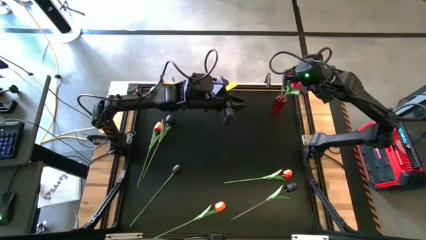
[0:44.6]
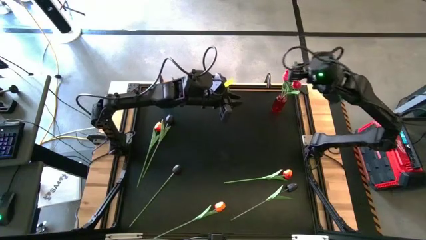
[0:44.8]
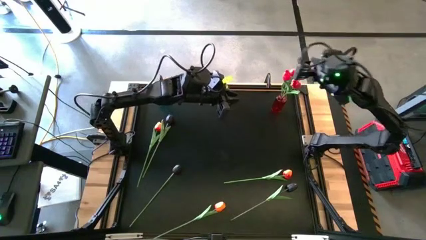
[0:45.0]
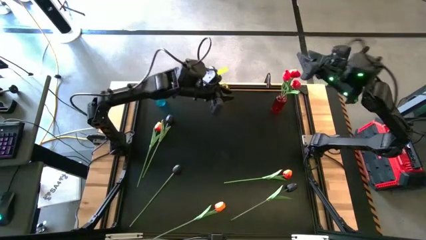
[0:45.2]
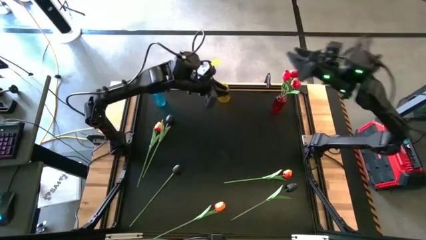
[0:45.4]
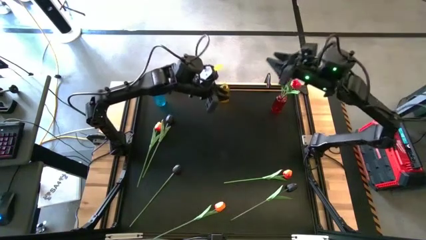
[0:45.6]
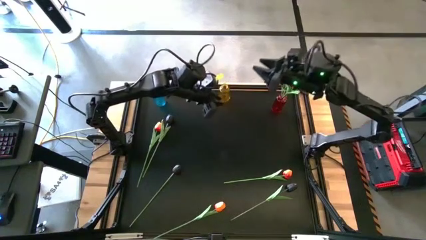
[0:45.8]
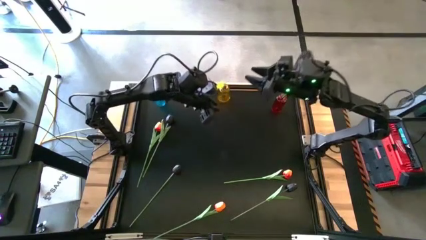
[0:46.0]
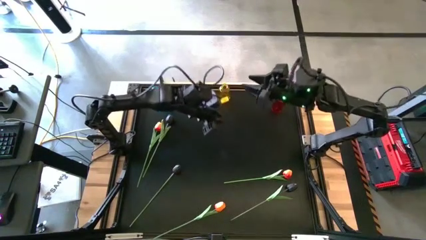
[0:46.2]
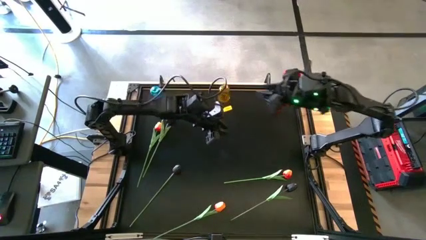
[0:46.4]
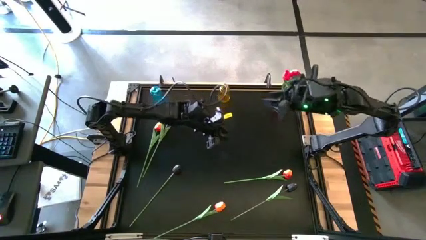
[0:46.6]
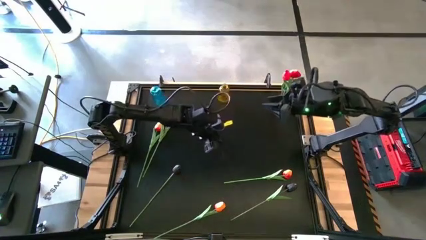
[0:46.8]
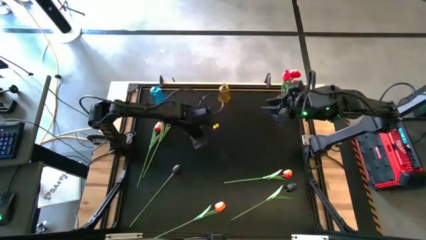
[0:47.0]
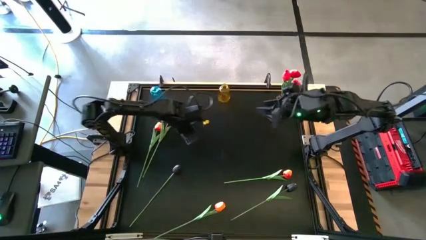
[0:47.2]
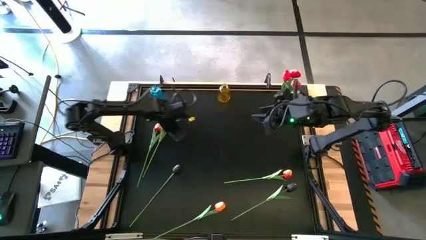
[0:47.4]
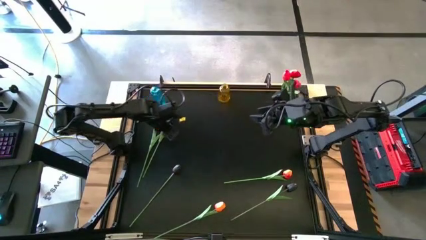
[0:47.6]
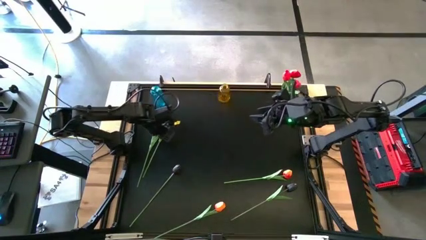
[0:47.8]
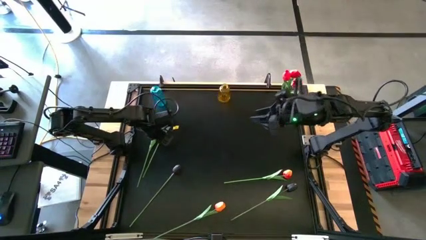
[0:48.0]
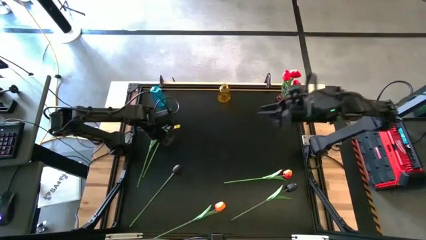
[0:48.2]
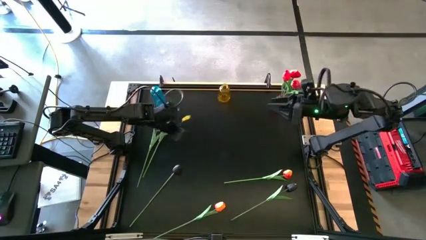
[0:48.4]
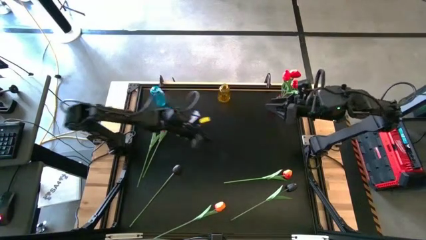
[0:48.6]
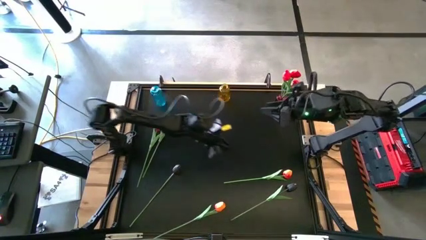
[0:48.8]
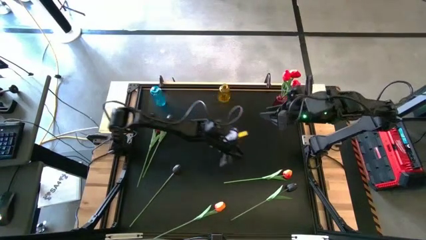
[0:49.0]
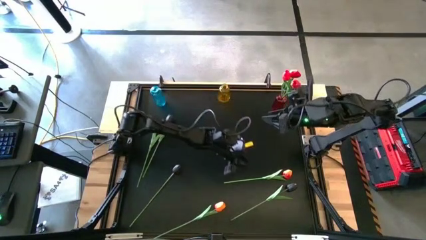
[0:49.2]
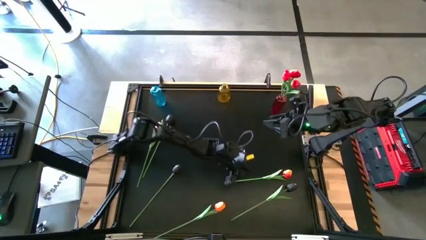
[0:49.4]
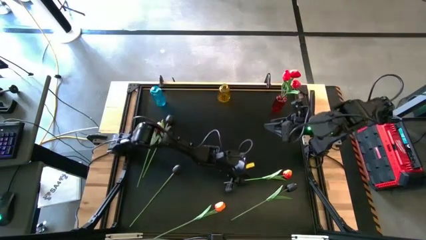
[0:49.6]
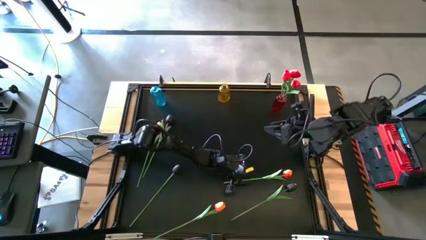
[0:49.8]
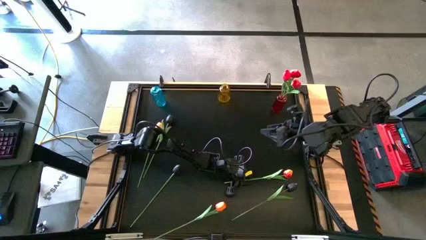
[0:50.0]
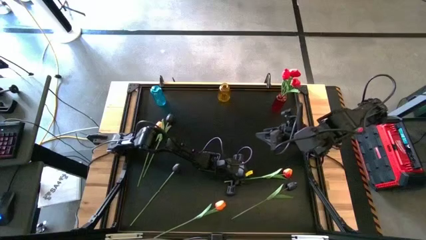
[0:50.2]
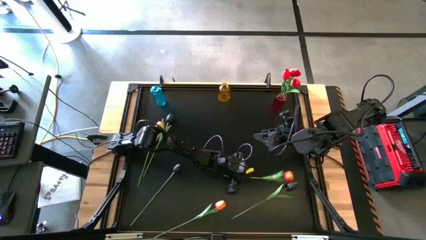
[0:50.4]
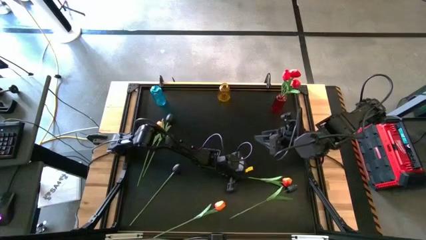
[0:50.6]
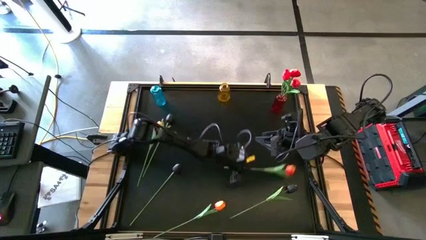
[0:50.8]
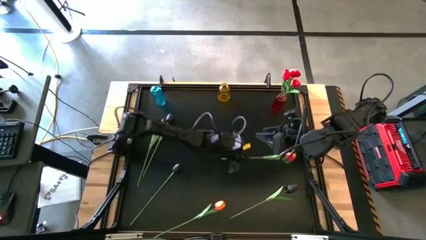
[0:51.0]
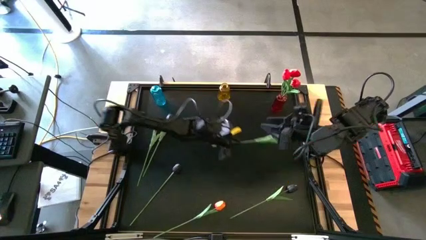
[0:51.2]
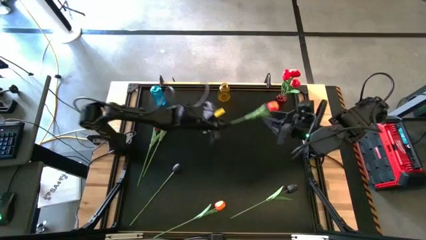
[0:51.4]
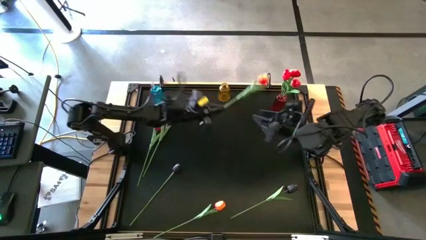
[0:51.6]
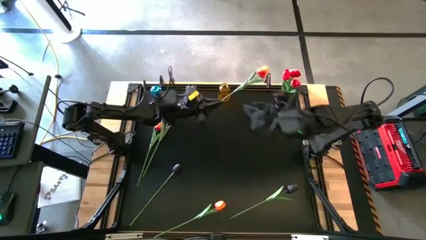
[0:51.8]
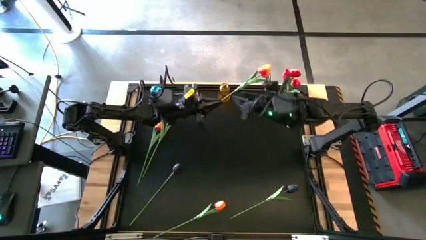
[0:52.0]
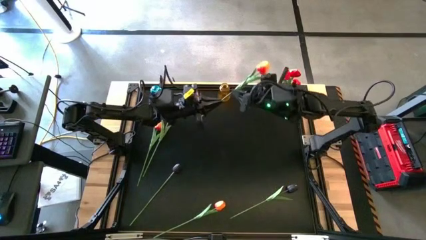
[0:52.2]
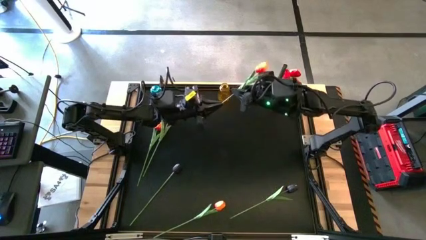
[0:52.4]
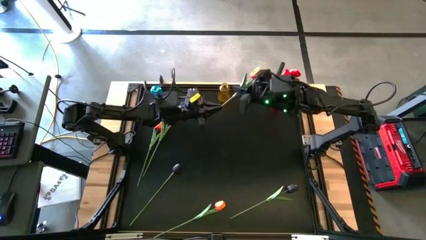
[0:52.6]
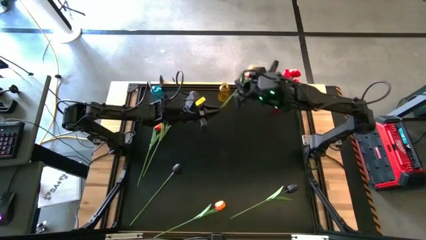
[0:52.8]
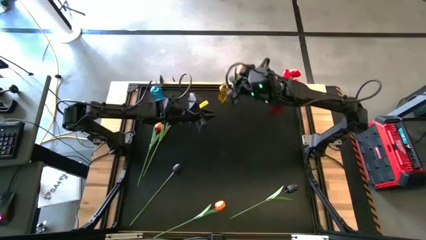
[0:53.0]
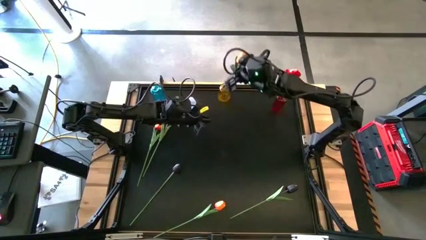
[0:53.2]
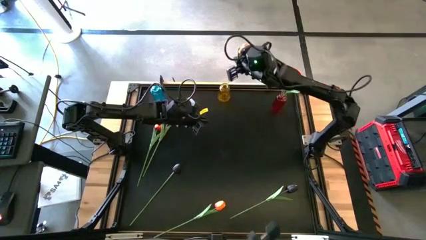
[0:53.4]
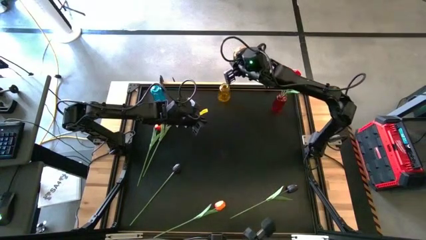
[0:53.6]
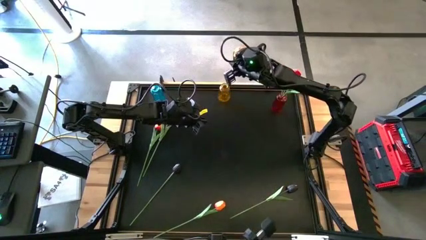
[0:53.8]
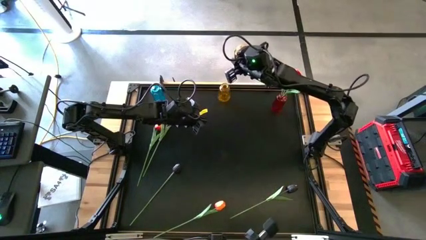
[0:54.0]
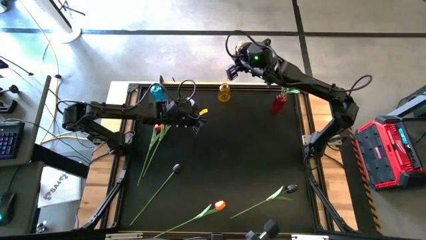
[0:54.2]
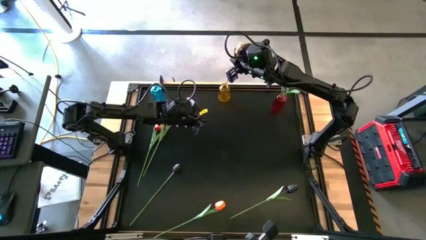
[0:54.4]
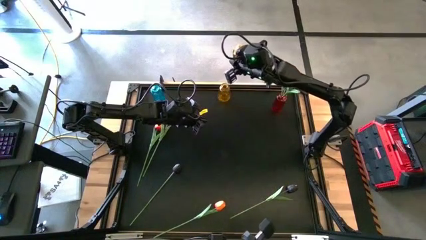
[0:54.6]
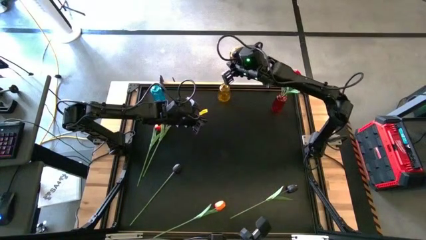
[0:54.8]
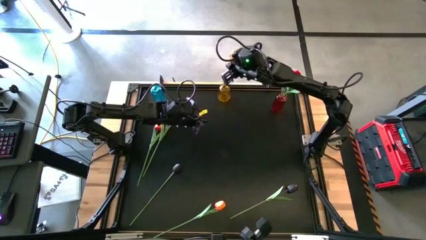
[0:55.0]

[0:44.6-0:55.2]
Task: Sort flowers into vase by color
Put the right orange flower into the yellow vase
